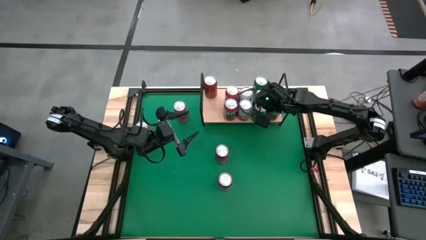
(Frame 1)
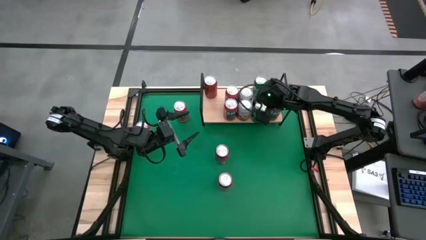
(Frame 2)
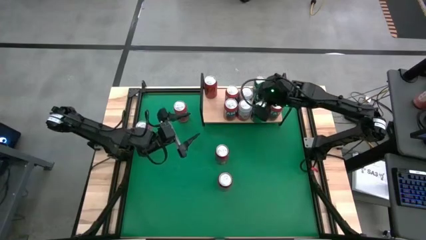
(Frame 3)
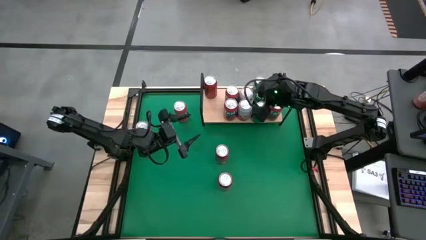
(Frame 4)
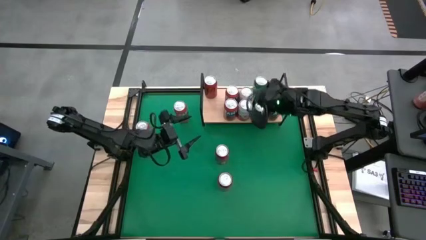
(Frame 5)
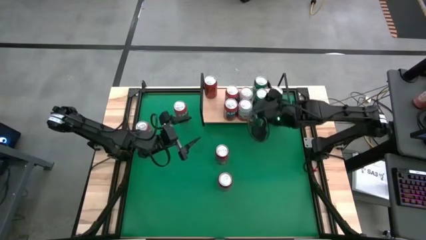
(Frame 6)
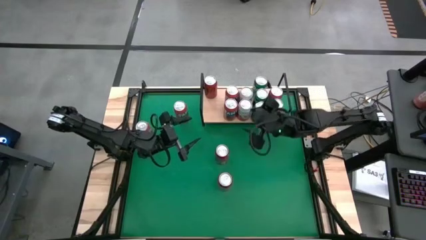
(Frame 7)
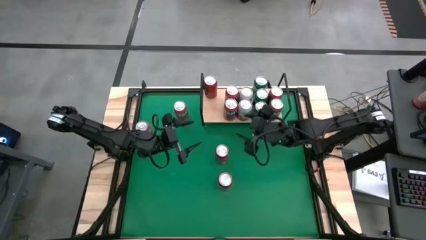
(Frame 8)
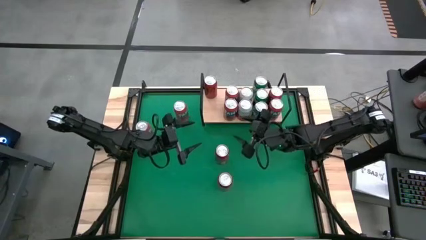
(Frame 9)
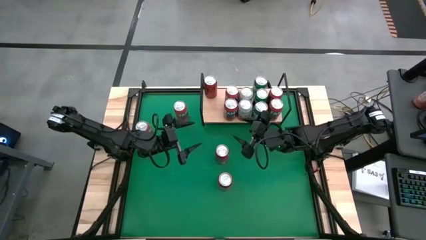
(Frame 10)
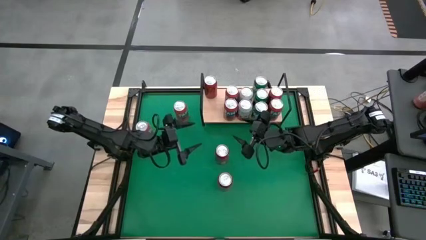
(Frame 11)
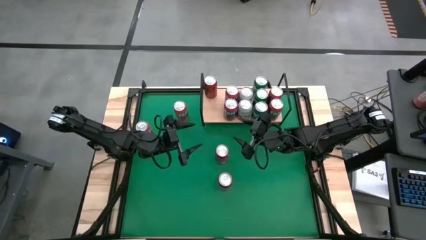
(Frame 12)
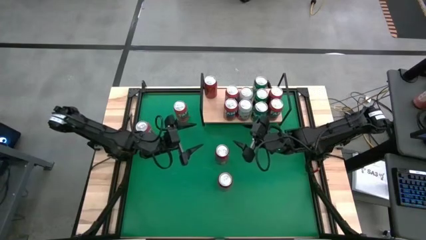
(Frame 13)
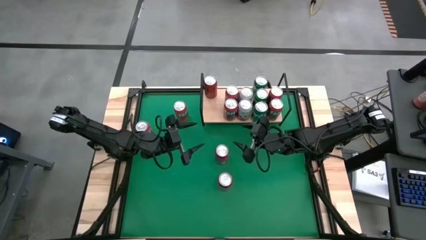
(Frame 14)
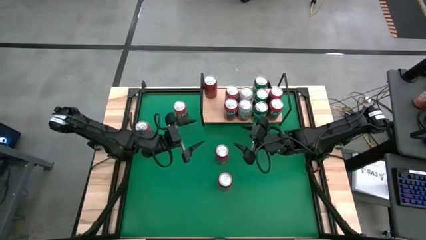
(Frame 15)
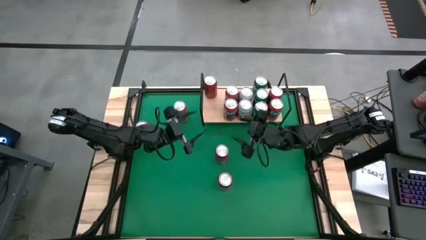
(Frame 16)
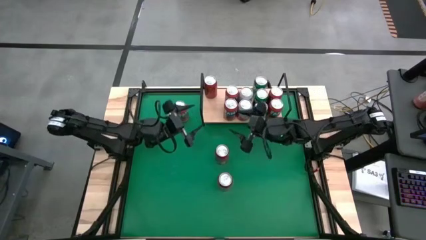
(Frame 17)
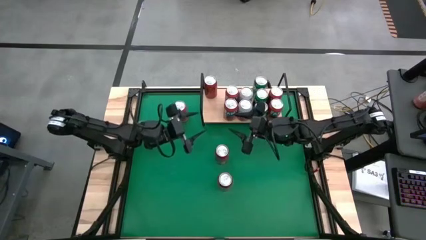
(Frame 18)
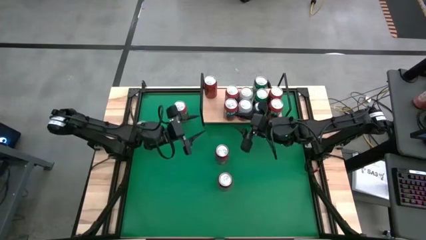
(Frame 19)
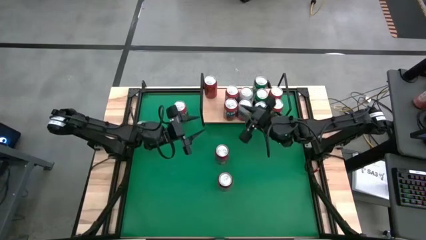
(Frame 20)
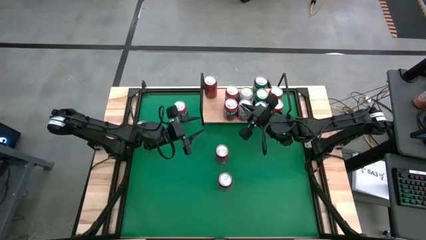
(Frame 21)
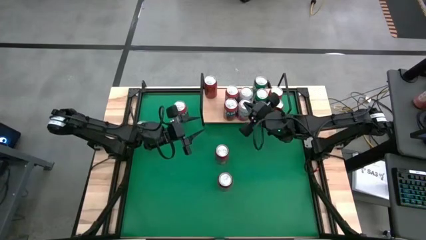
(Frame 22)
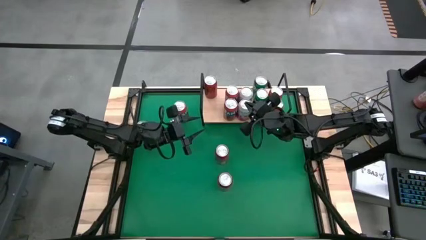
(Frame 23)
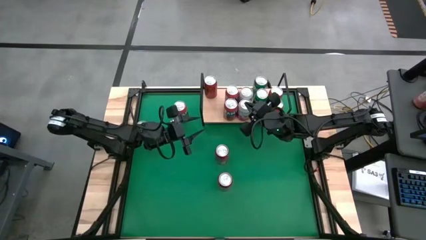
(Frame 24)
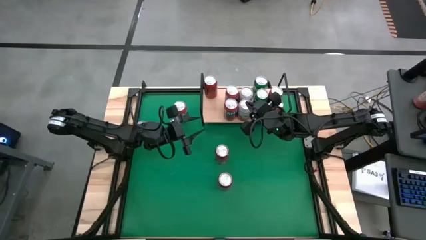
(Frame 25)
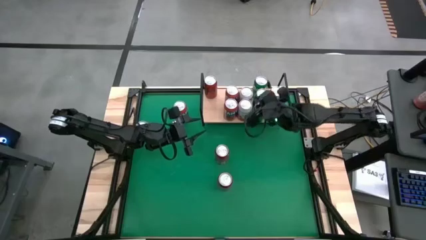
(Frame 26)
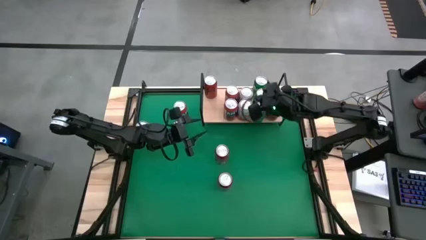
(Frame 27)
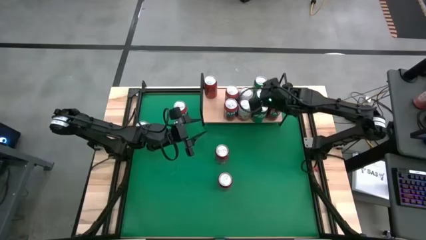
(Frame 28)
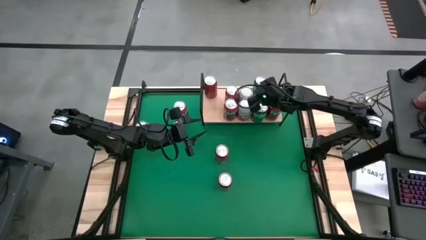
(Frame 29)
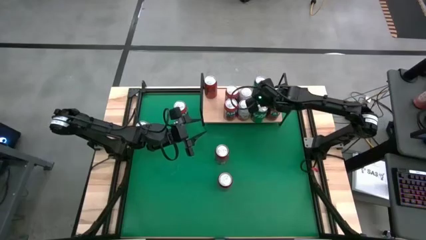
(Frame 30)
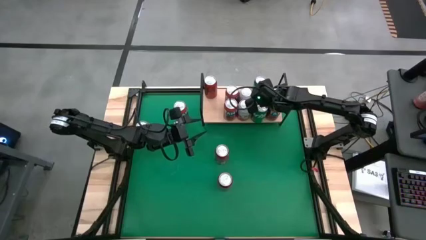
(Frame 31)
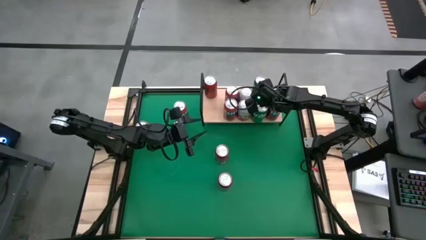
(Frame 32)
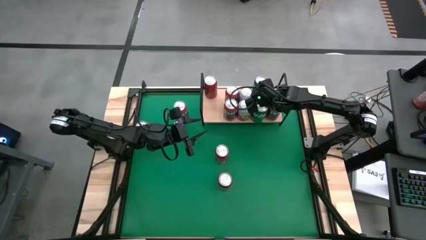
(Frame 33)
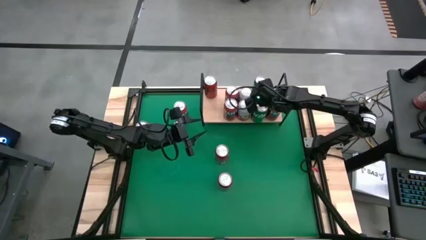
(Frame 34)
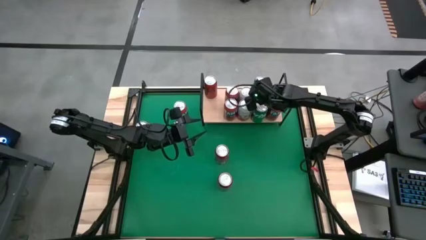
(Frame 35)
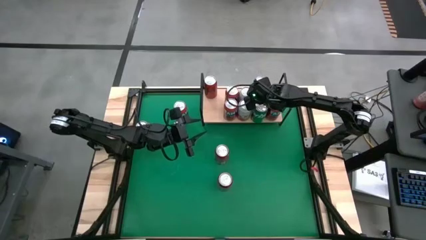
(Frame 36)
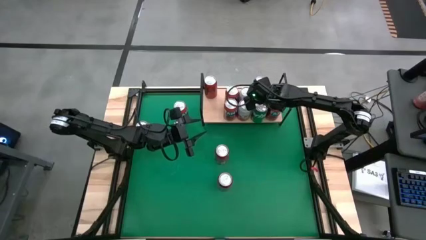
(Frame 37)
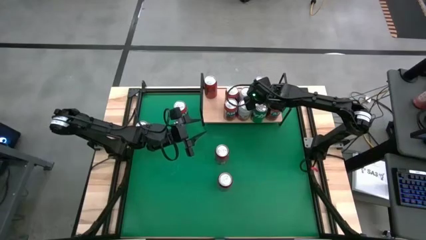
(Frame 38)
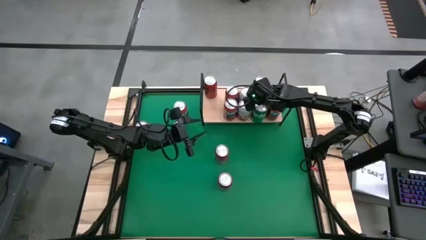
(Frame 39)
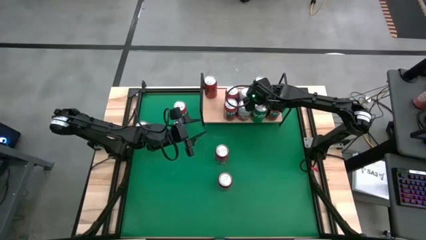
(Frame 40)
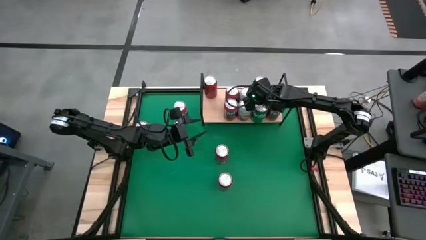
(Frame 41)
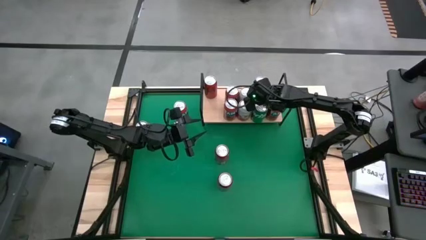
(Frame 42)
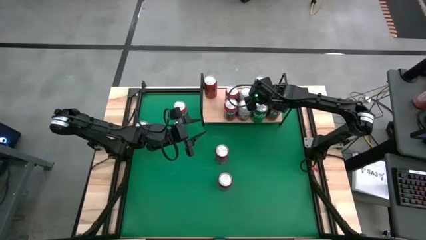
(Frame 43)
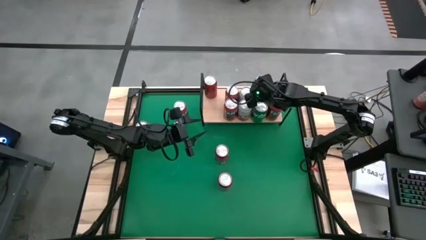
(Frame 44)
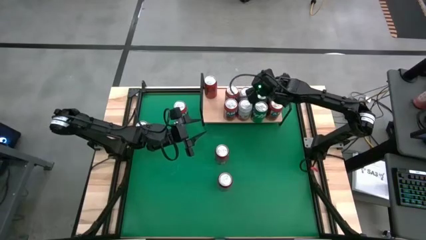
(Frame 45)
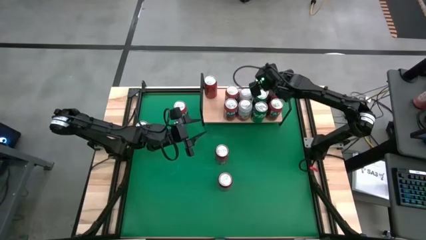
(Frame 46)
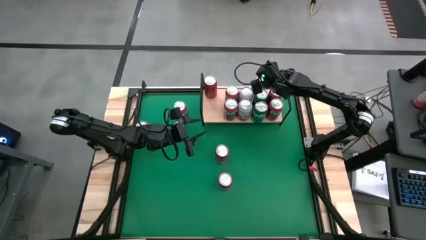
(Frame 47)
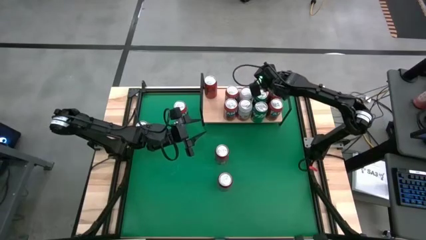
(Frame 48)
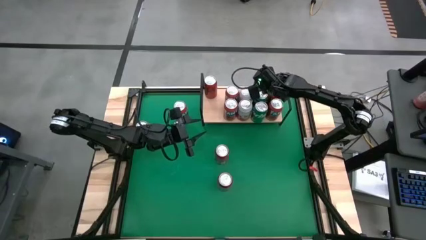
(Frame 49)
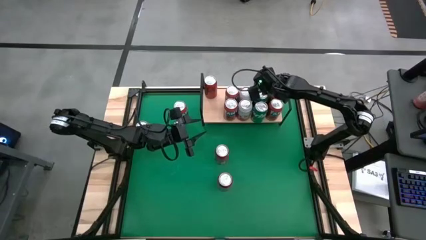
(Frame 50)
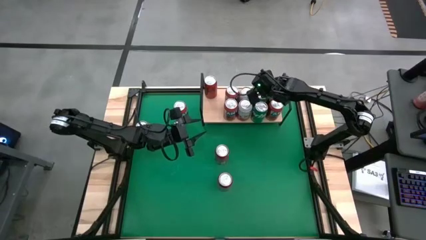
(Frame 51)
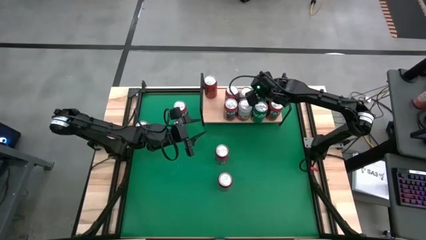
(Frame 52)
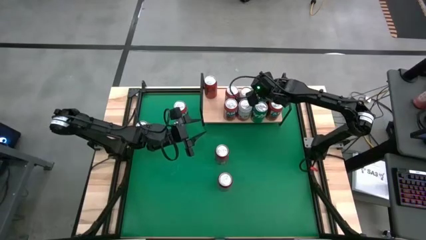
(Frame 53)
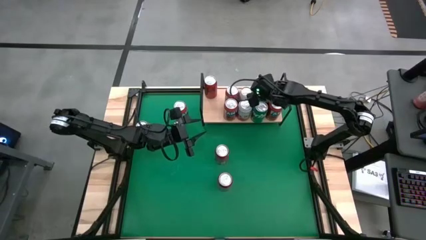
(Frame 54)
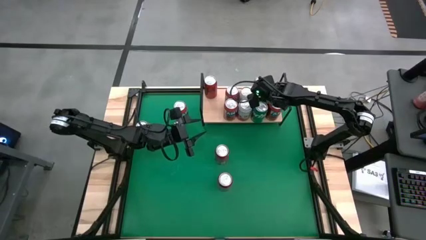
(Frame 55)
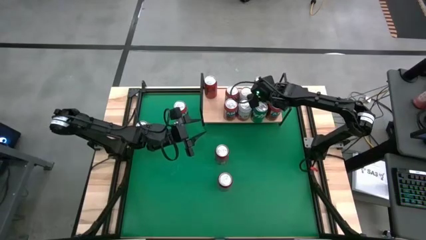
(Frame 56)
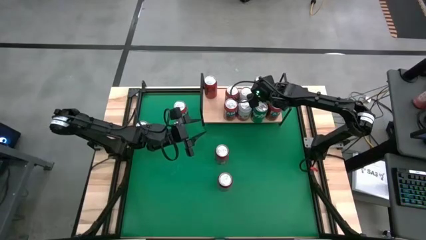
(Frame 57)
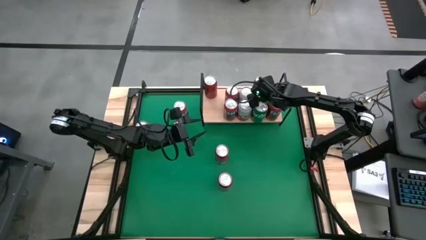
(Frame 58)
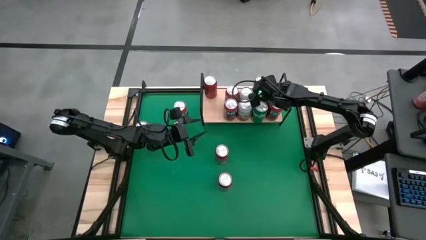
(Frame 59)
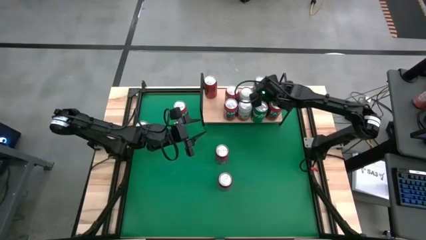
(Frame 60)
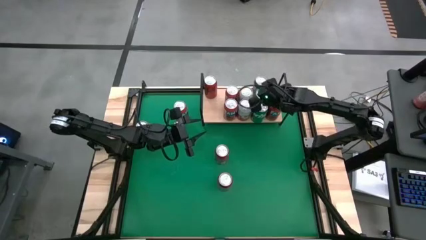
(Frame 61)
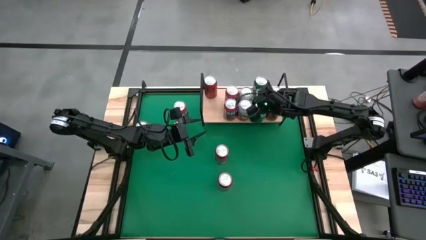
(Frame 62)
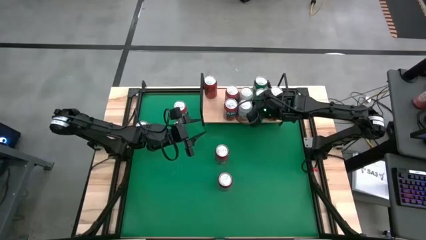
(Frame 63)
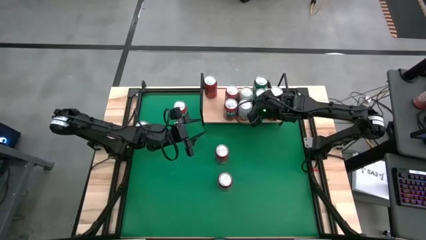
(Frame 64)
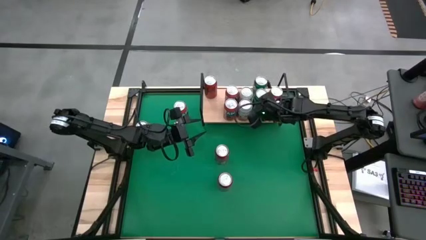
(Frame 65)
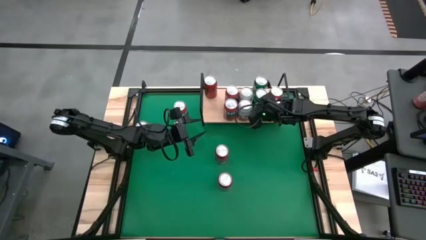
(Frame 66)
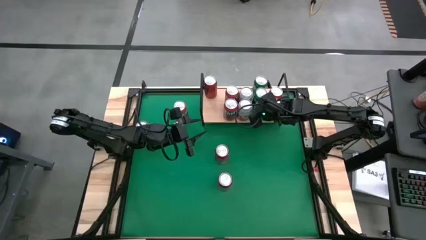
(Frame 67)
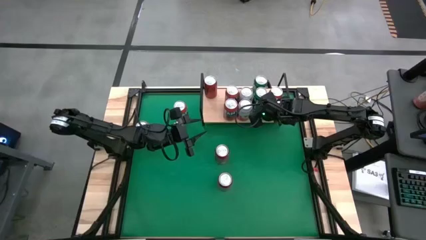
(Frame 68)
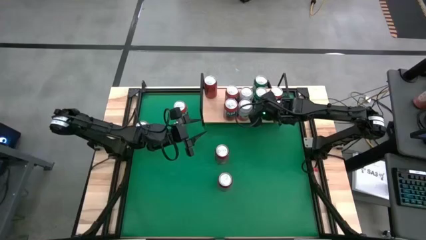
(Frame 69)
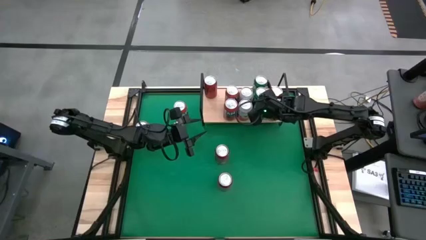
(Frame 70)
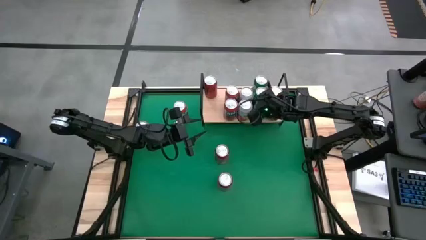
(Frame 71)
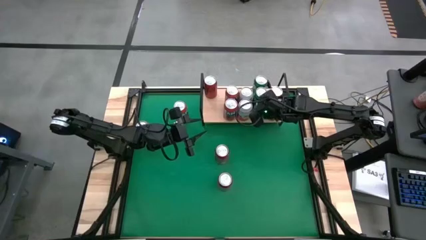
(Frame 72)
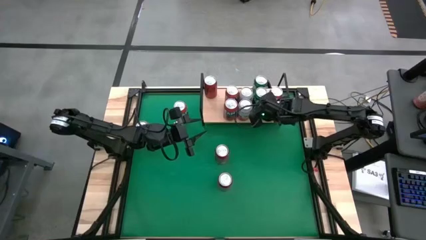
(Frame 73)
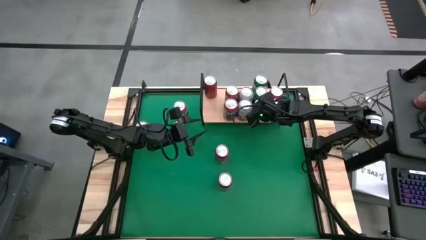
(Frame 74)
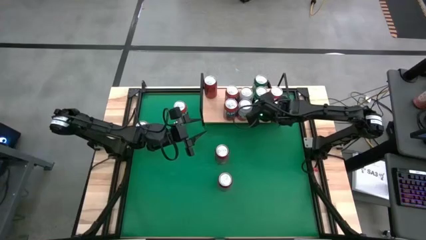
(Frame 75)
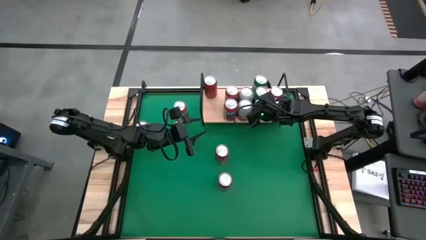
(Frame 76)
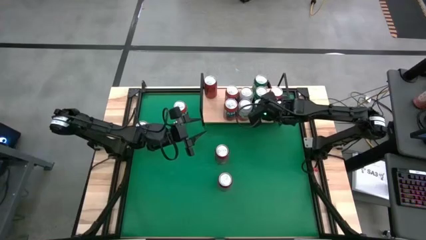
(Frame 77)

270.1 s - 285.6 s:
Task: Place canned beverage on shelf
Adjust the green soda cans
